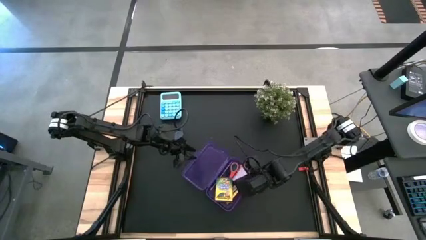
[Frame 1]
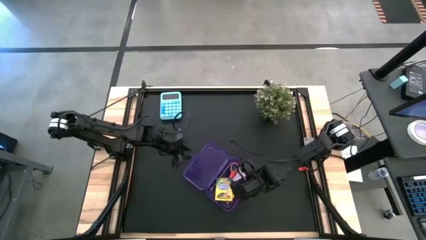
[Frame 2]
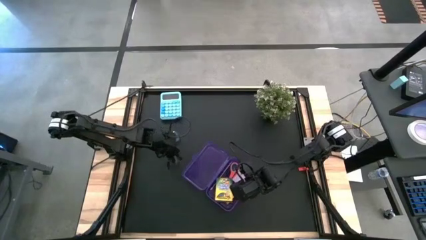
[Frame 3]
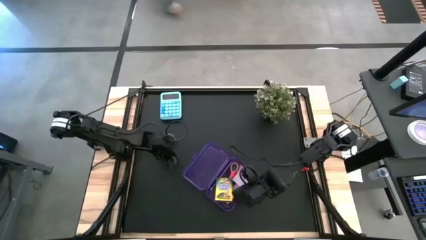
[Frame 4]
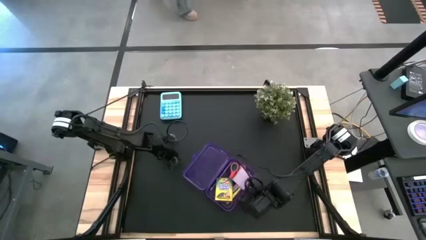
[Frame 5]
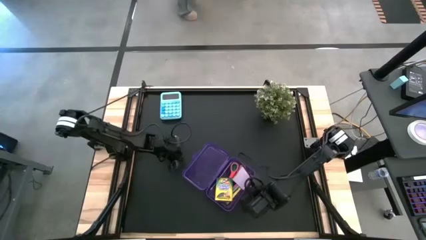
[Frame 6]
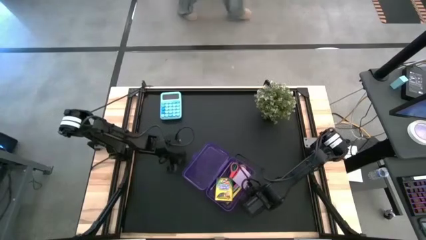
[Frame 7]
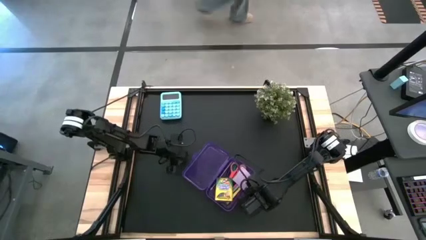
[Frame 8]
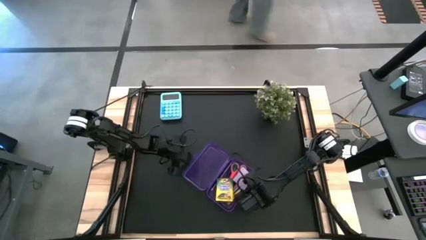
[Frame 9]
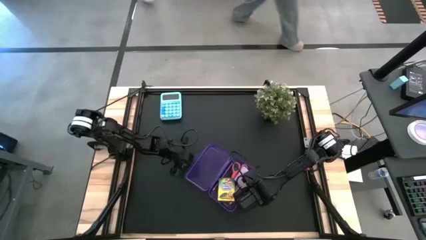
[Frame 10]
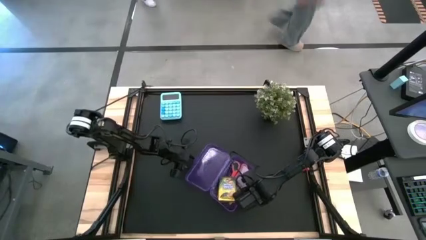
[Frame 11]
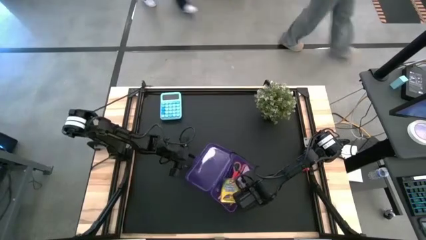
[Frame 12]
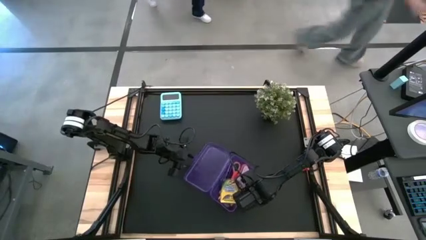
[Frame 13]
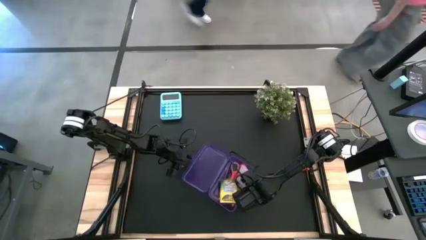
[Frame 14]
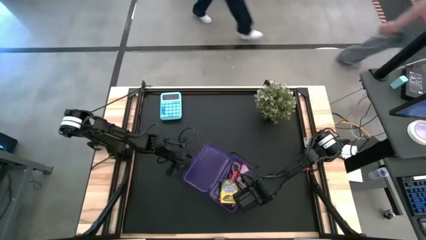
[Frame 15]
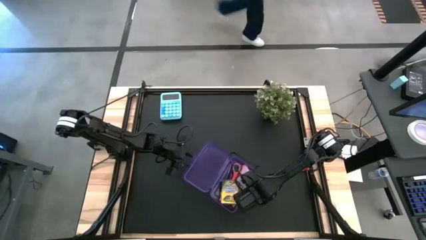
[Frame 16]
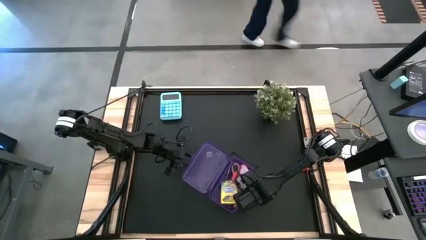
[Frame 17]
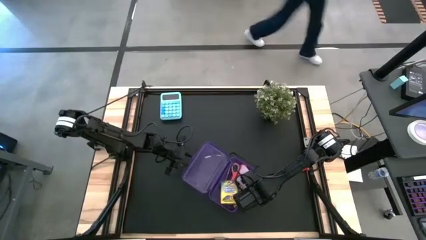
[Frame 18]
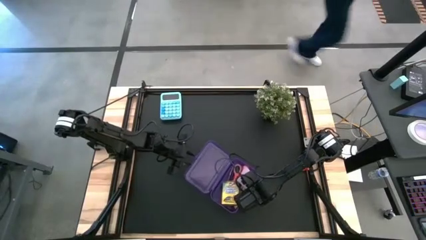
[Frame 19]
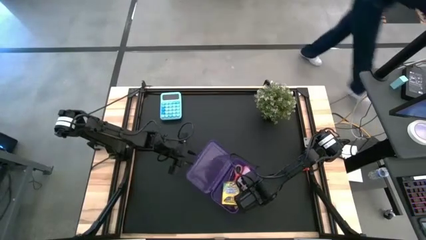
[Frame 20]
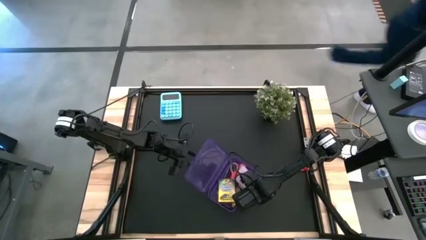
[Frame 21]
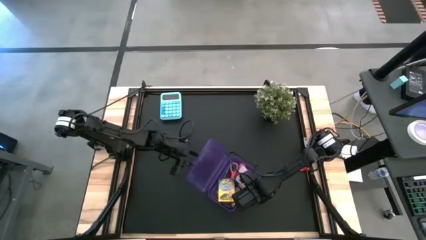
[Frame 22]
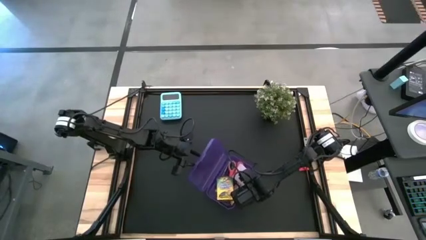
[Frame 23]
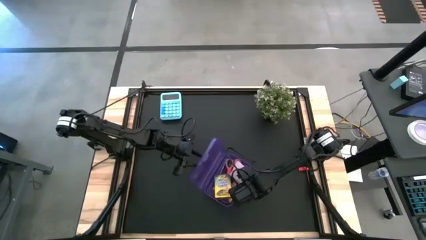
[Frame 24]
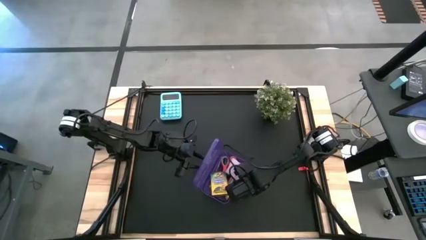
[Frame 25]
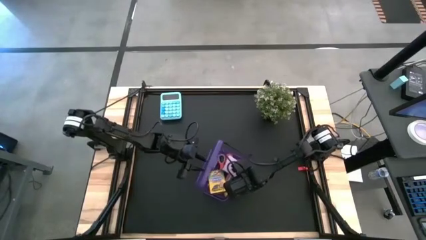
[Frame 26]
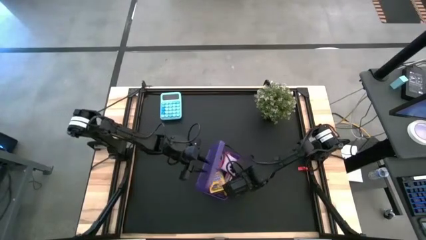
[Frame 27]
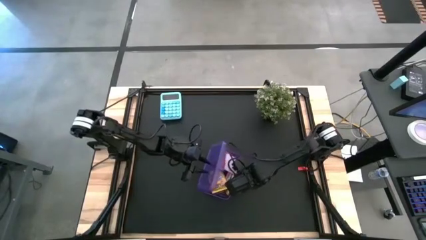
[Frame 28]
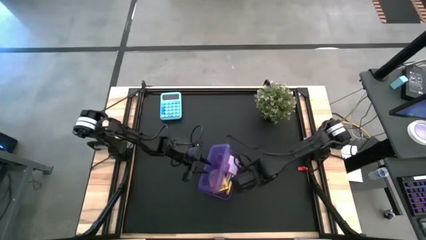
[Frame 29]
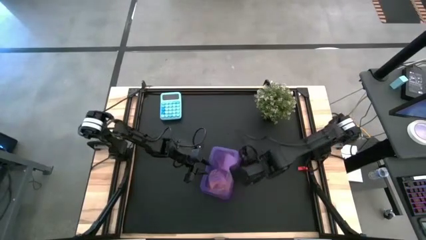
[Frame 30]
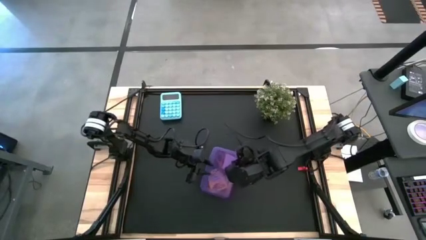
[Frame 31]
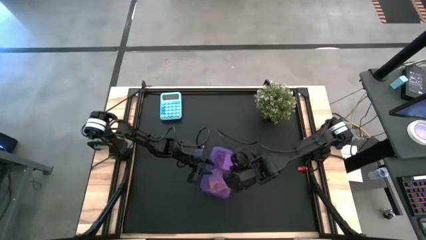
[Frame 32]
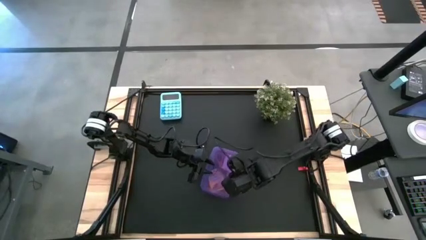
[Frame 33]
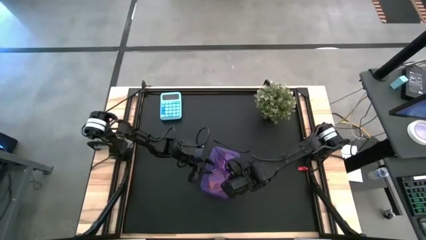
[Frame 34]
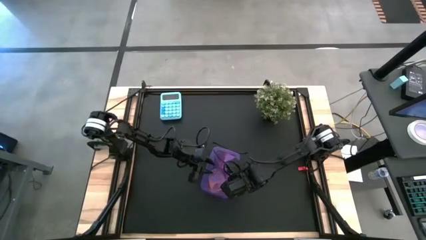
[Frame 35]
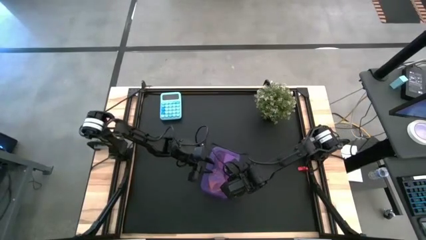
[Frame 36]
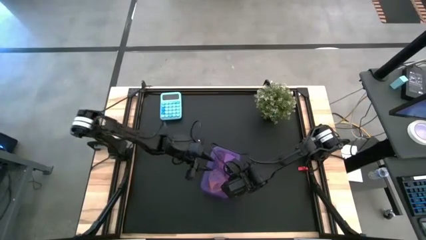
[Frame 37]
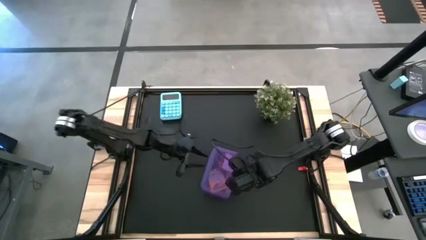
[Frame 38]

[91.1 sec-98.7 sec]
Task: Pack school essentials
Close the purple supply box

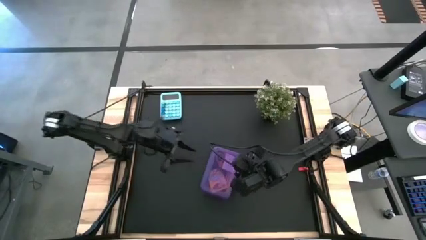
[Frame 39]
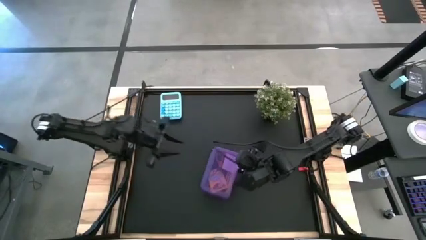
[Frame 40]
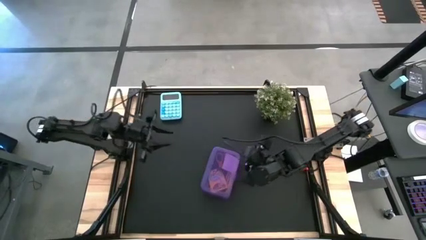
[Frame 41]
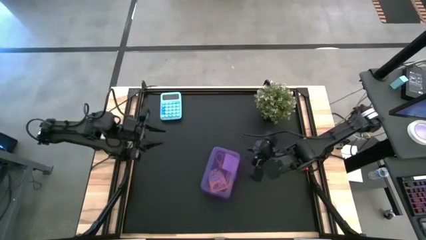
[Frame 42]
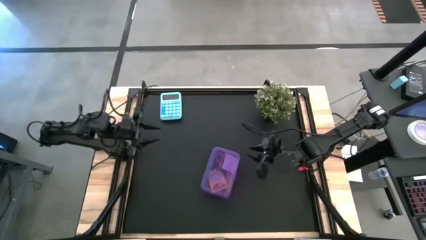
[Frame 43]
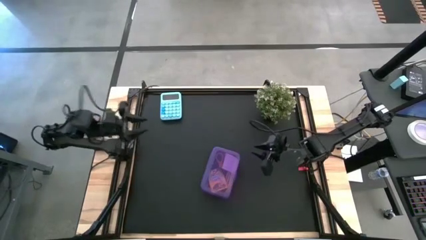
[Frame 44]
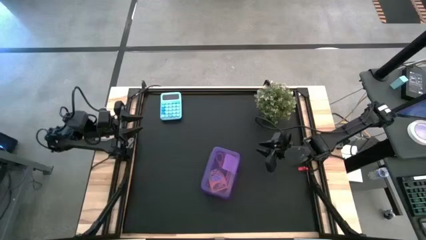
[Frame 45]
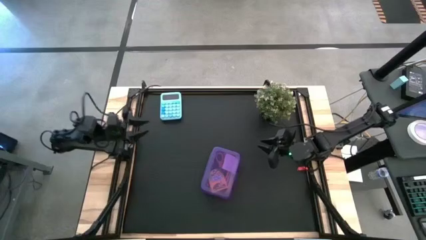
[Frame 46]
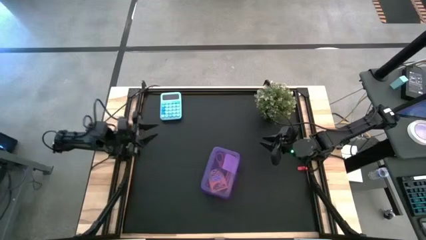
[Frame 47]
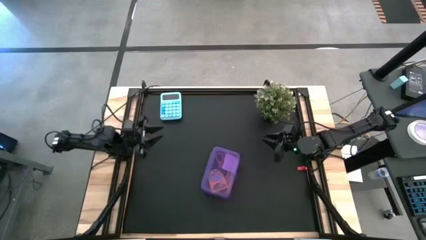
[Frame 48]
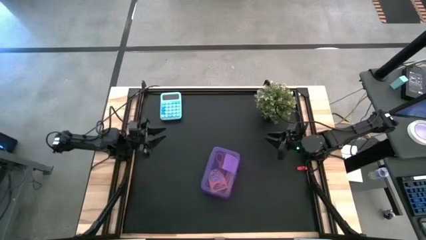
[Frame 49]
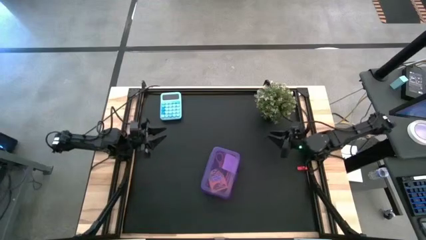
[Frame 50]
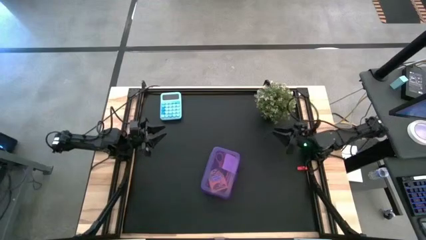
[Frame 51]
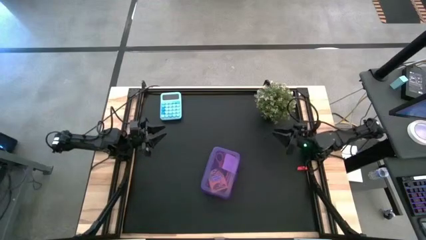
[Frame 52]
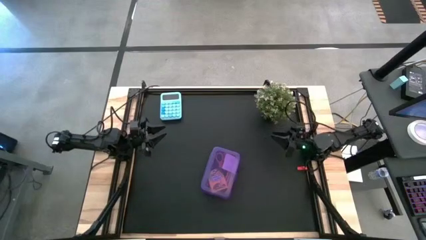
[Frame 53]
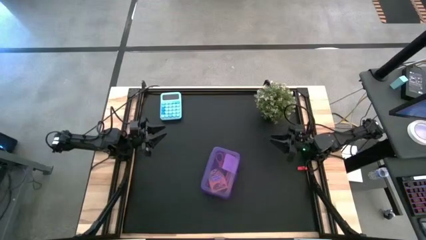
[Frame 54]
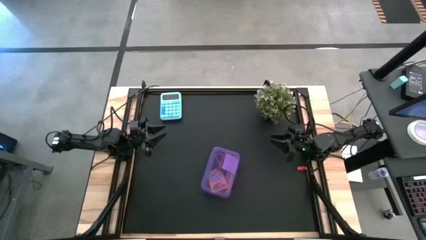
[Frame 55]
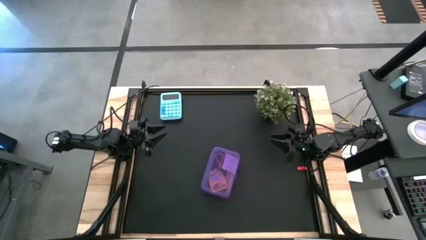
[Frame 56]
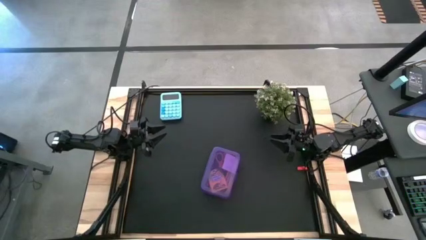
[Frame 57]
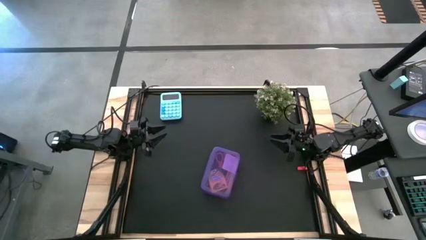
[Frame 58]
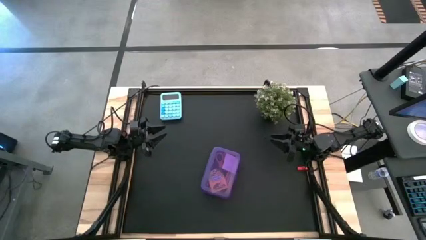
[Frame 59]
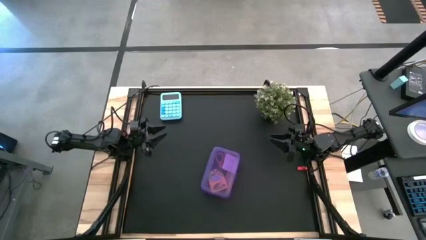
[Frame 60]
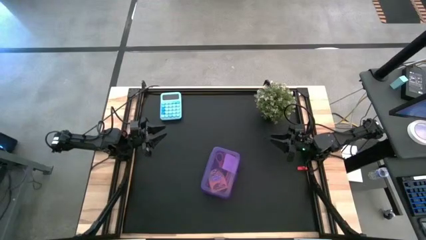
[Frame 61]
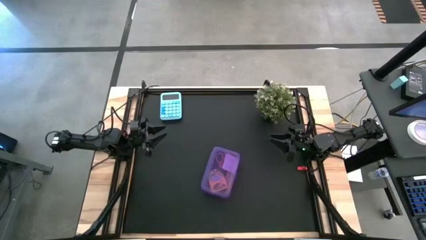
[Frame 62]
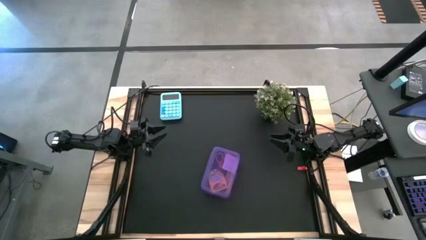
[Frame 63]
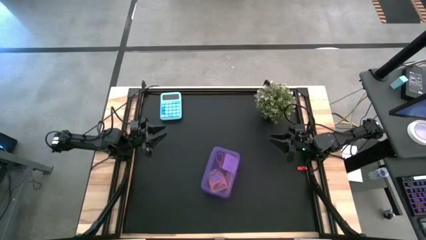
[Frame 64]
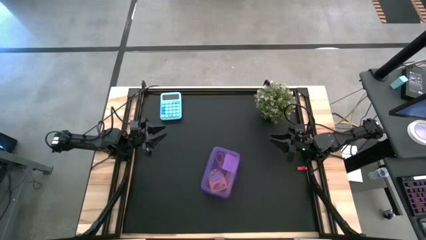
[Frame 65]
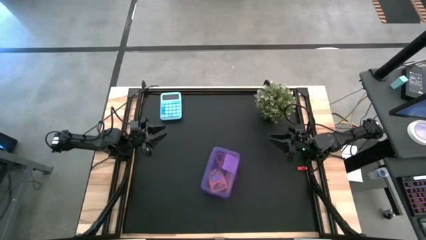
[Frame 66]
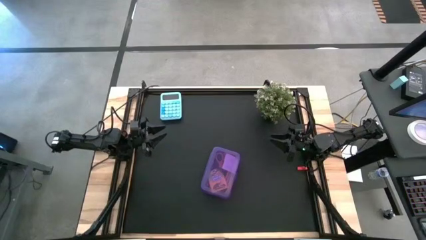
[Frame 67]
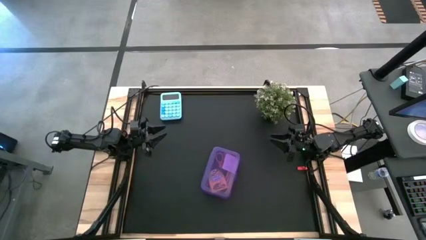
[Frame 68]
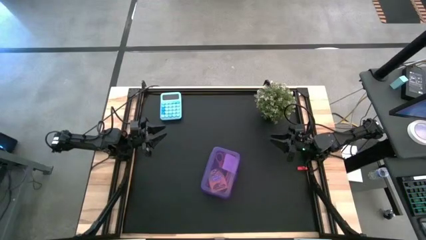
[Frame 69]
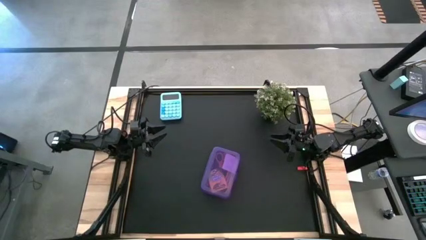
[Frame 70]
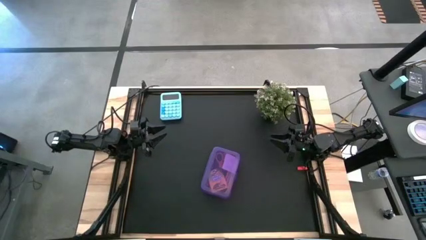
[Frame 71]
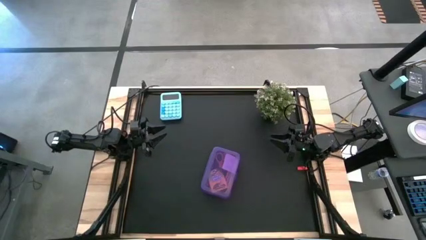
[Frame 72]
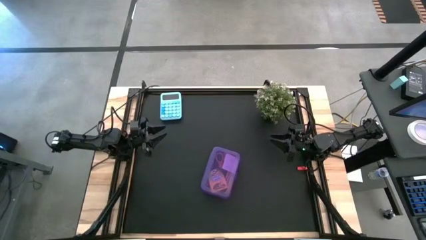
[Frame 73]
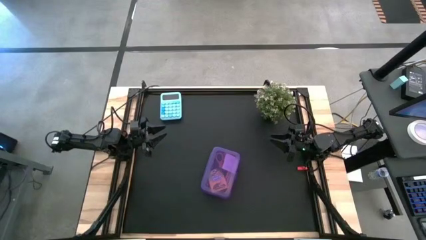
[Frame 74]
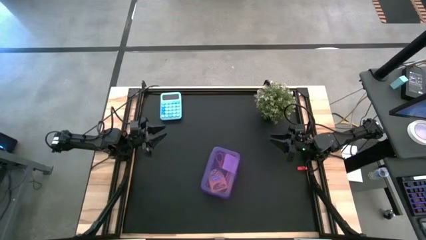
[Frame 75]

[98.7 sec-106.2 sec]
Return to Home Position
